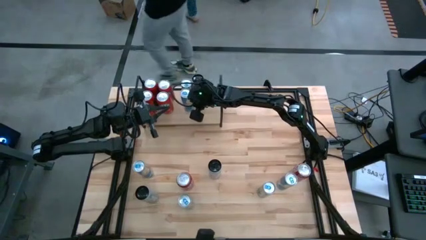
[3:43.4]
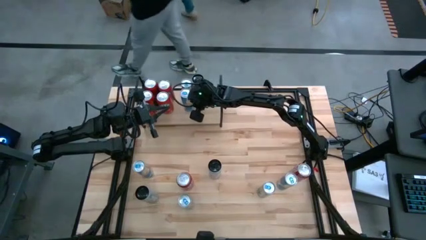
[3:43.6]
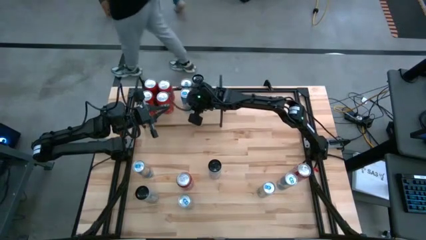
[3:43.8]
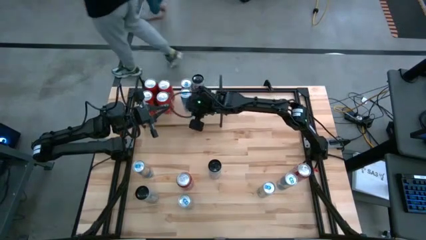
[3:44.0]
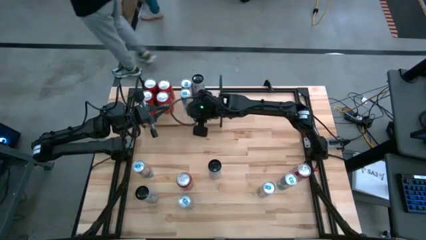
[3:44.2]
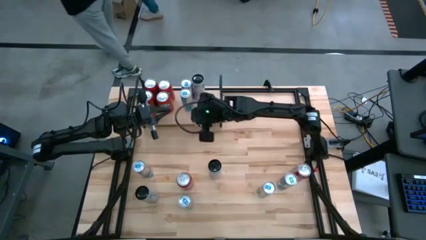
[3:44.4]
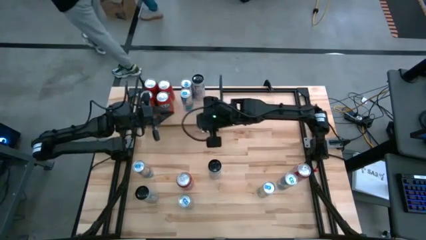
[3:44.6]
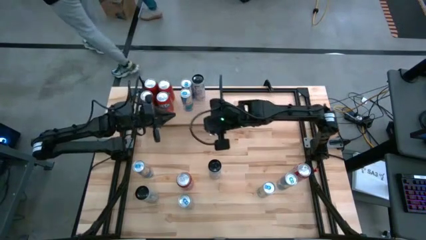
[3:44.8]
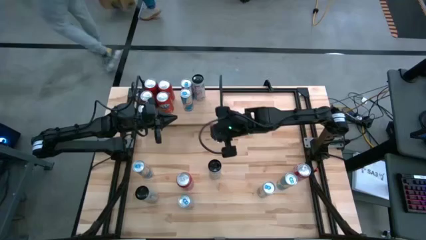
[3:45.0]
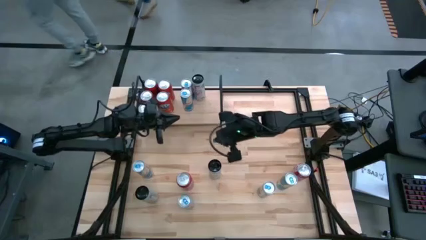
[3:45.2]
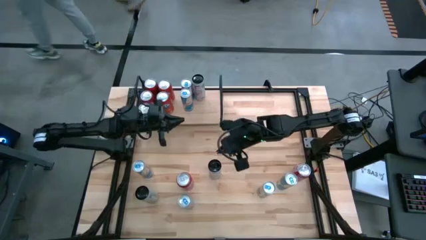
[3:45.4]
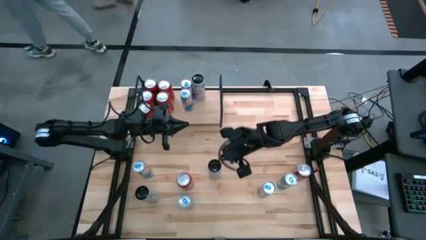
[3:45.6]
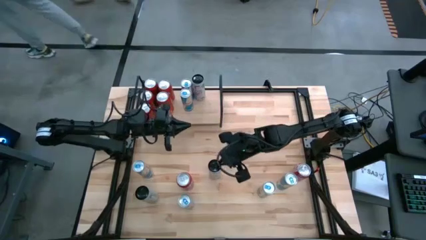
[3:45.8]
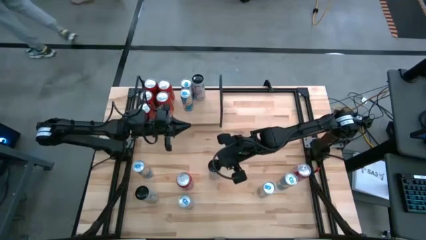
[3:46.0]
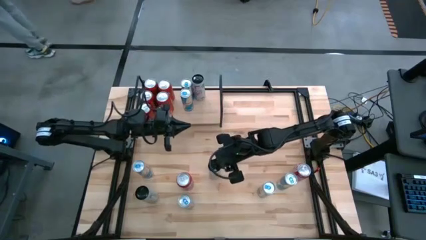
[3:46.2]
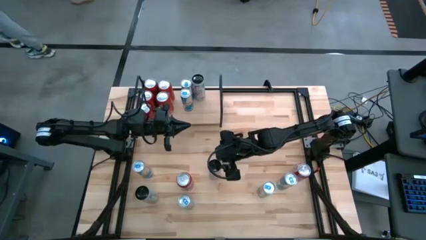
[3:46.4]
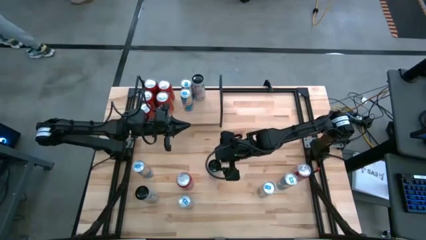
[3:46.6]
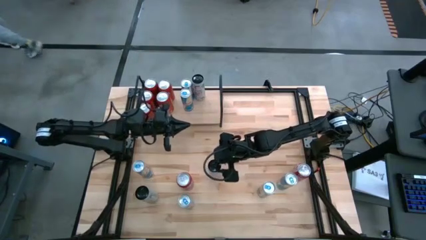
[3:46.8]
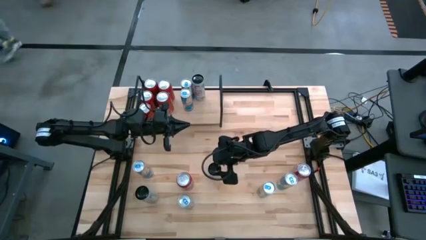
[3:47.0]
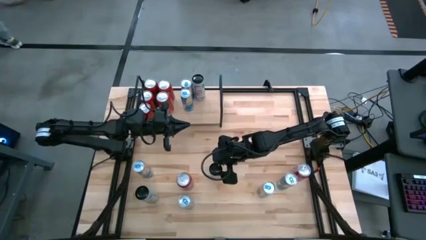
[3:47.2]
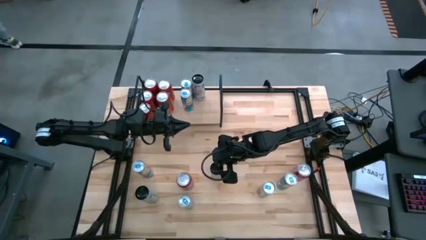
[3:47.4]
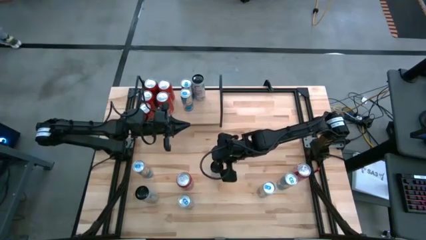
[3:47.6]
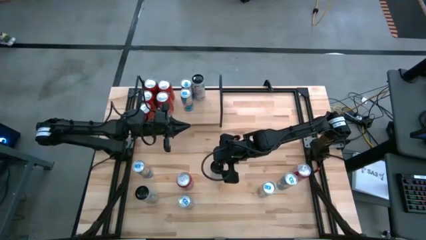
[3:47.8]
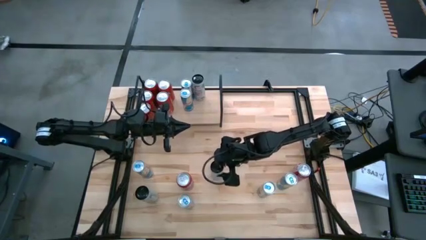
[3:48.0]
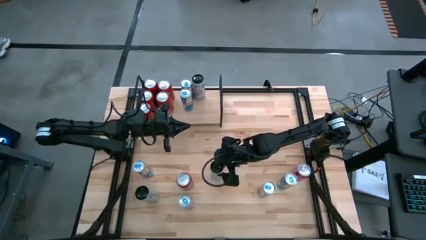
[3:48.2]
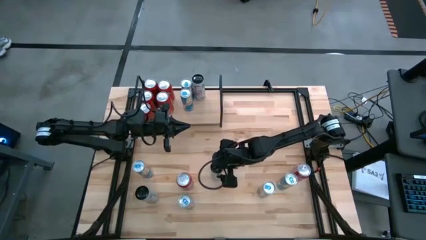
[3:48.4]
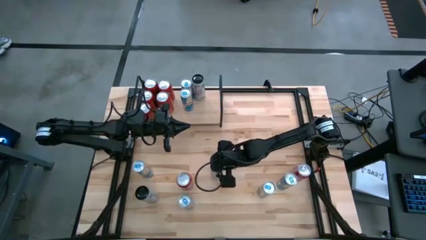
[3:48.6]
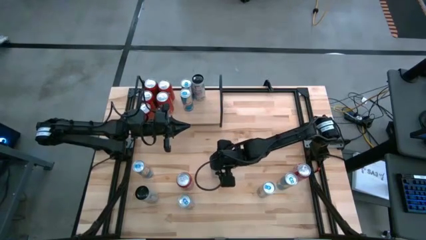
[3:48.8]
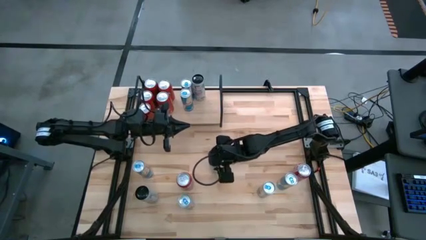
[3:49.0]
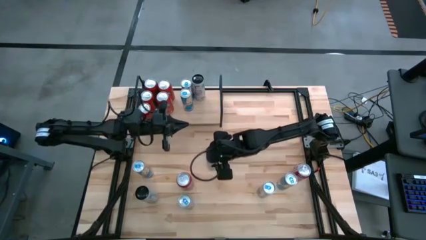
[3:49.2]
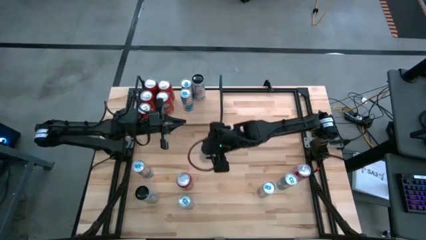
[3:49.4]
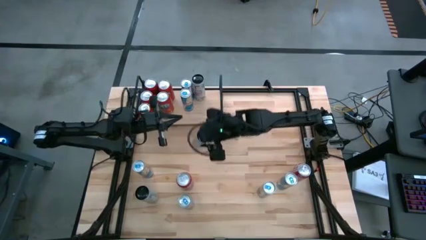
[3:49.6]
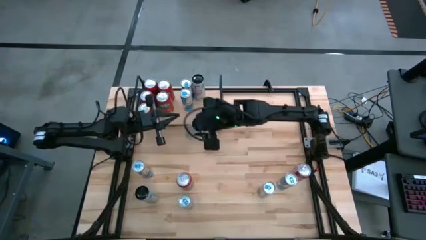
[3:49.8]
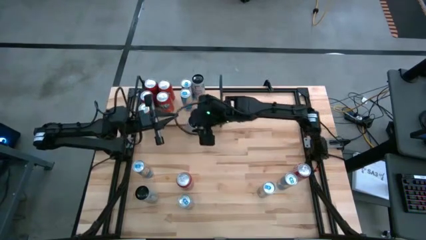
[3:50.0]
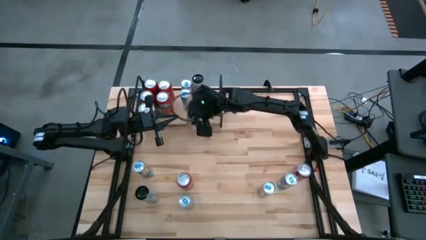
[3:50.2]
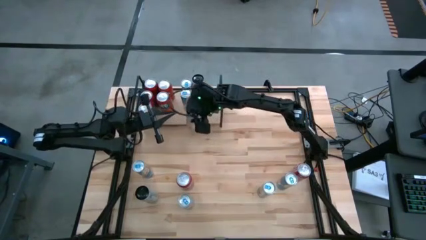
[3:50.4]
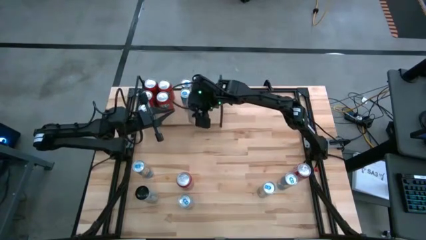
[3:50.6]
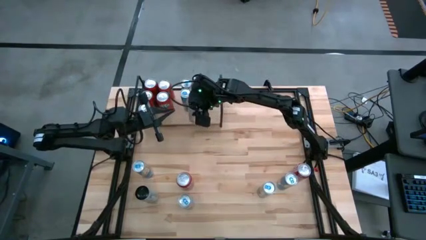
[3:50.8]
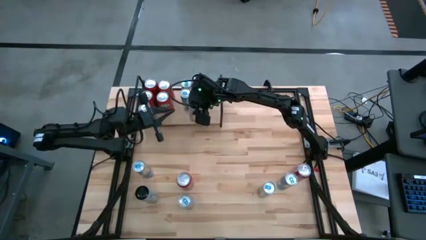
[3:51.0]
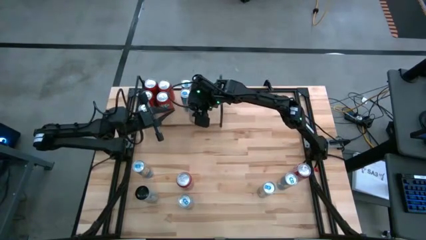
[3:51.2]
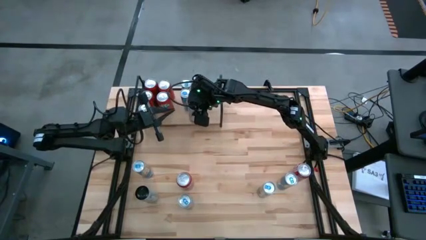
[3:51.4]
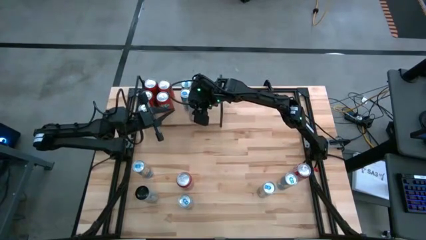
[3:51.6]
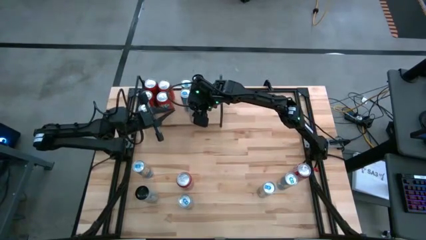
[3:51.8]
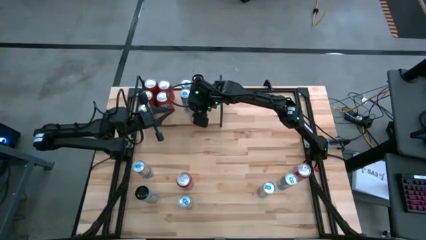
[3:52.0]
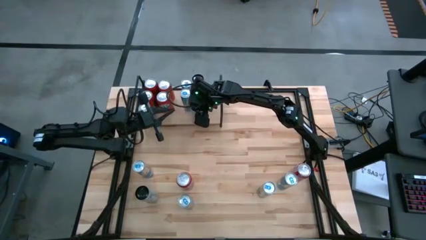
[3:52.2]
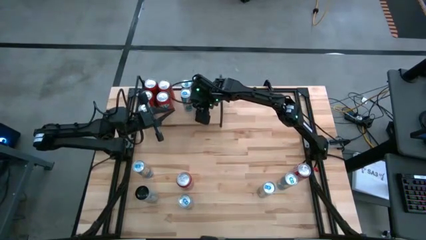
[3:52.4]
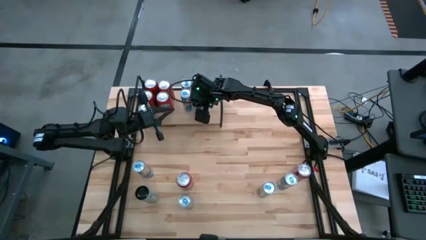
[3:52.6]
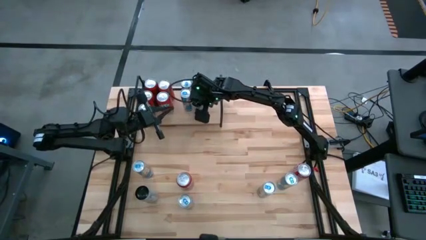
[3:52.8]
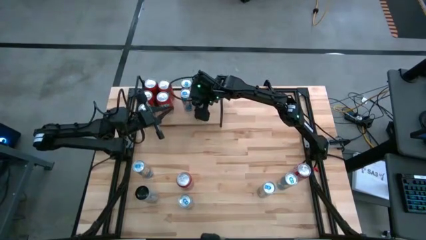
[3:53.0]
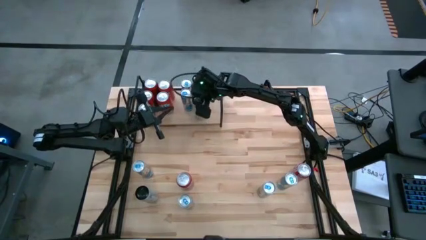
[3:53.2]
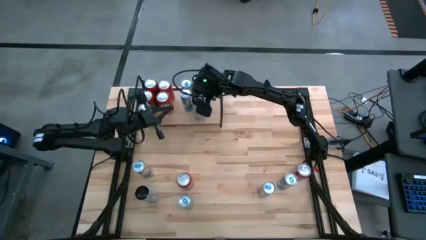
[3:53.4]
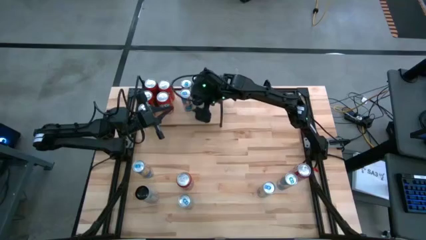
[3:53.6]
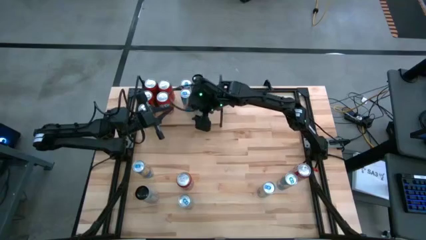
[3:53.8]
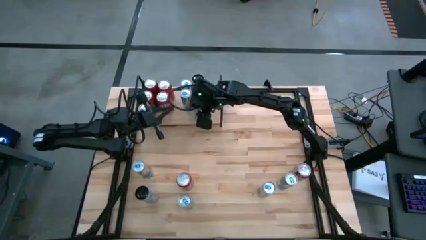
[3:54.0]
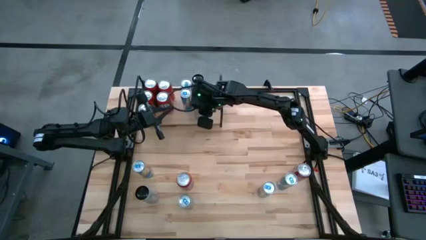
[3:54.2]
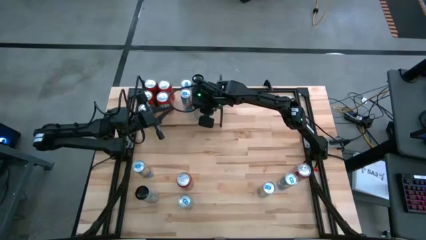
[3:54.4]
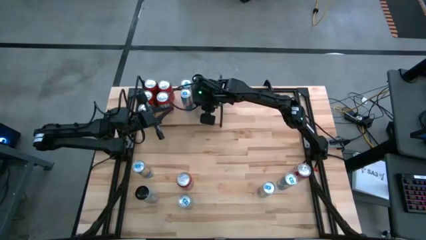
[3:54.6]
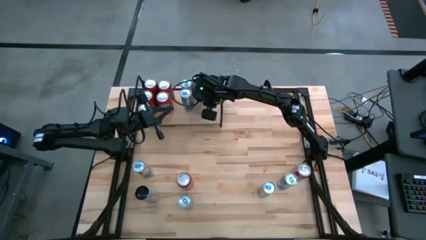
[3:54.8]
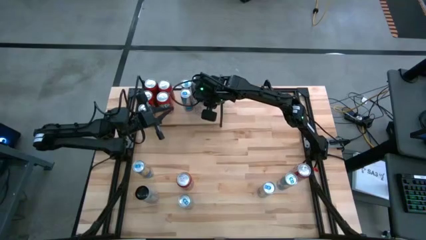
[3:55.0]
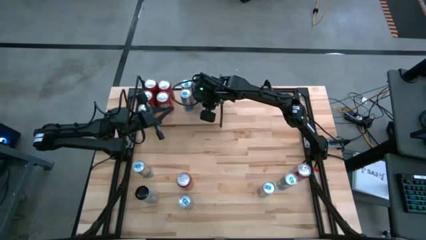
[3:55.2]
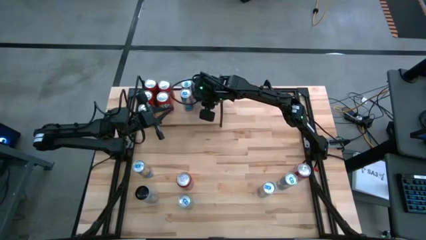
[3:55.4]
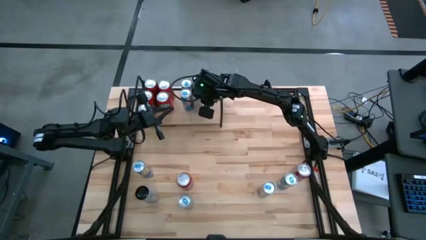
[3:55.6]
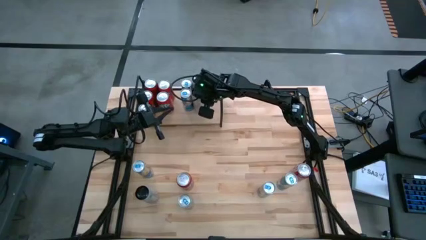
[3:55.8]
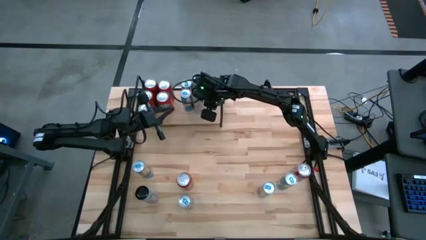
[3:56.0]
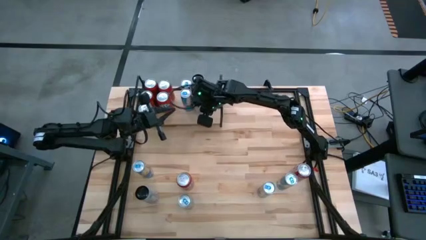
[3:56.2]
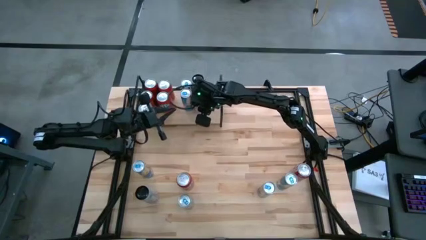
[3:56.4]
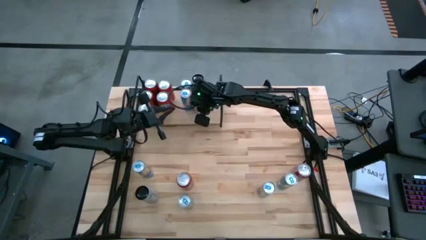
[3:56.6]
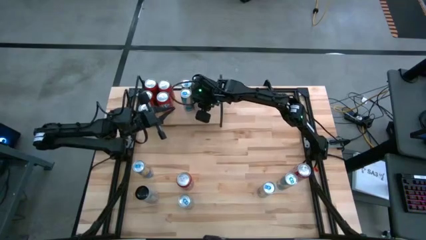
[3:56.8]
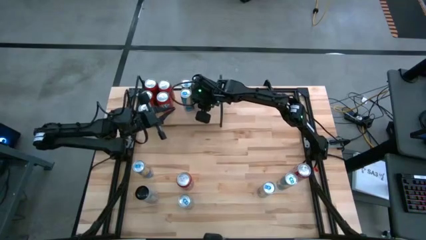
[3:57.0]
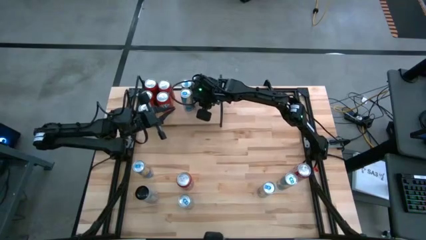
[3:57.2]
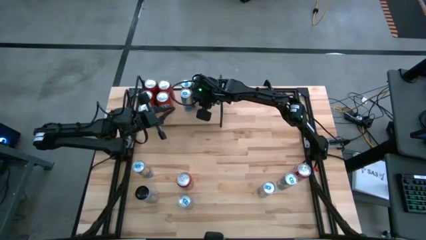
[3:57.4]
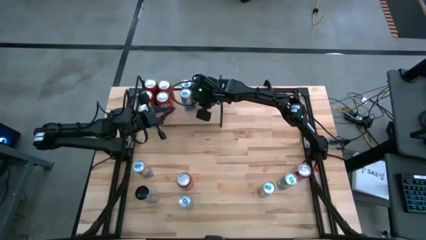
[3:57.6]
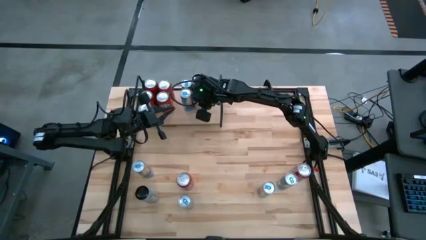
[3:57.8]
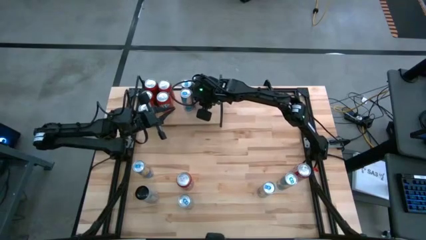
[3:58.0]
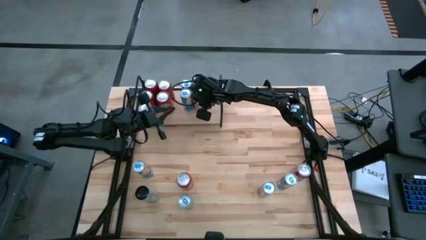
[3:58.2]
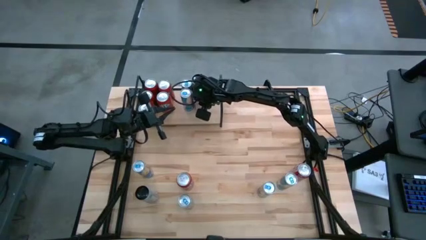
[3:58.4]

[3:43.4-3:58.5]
Task: Place canned beverage on shelf
Put the white and pink soda can on the shelf aligned with the other white and pink soda can
